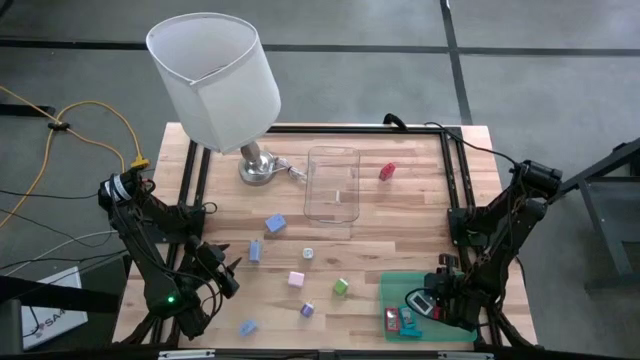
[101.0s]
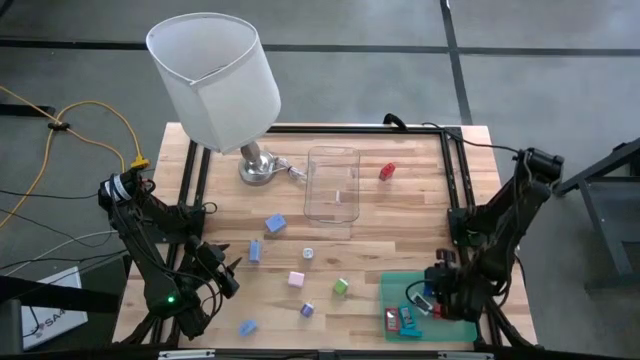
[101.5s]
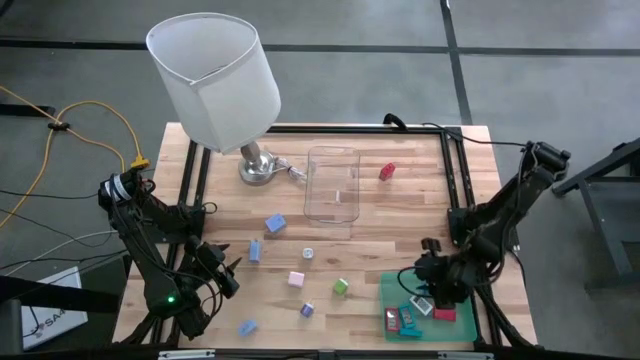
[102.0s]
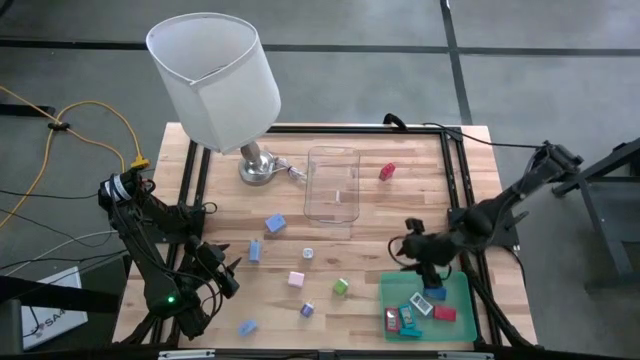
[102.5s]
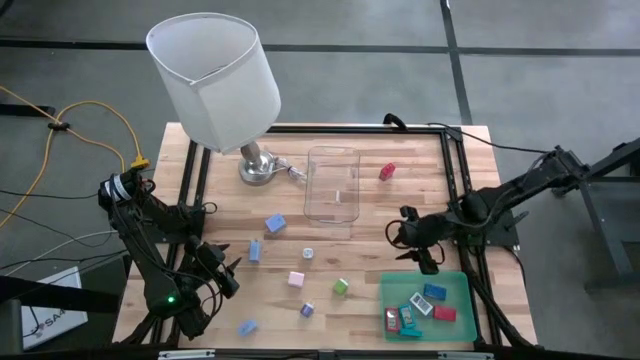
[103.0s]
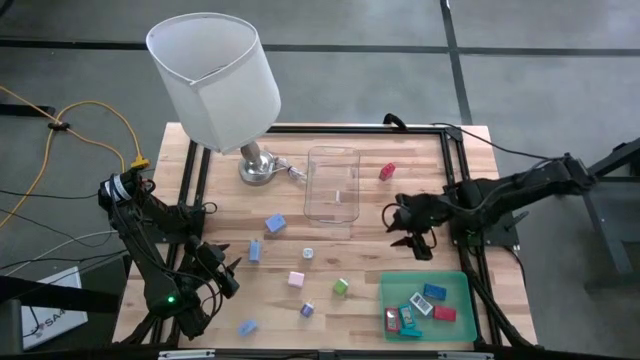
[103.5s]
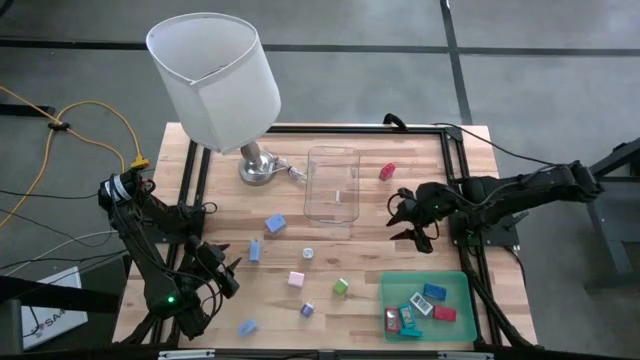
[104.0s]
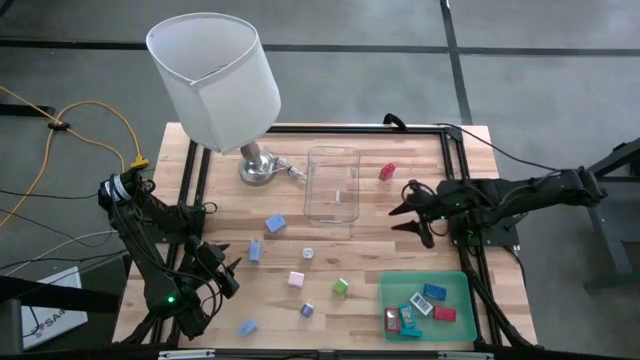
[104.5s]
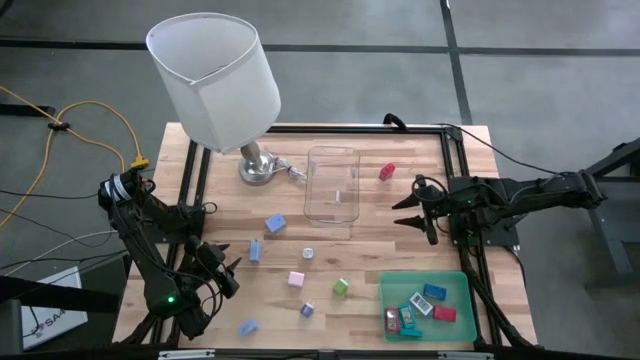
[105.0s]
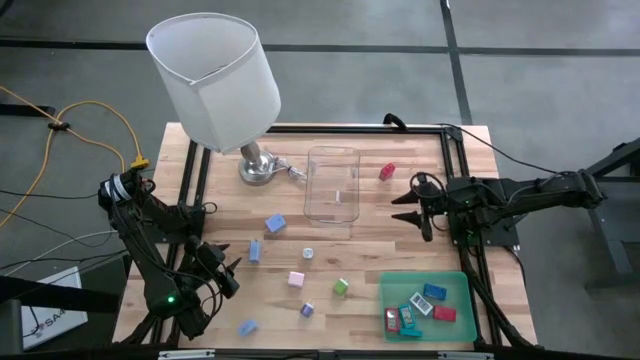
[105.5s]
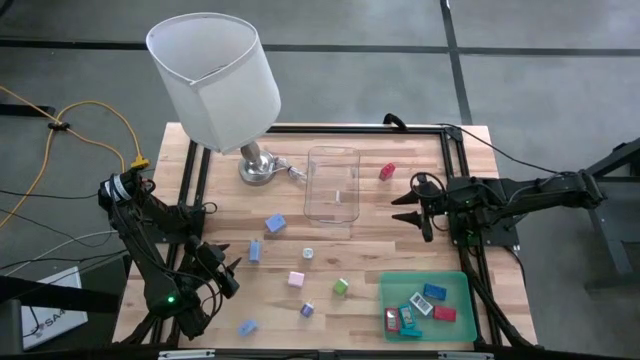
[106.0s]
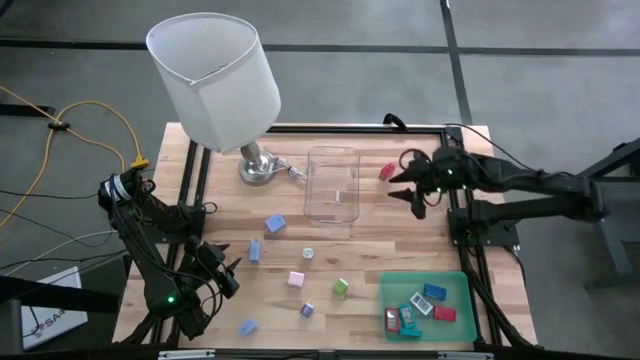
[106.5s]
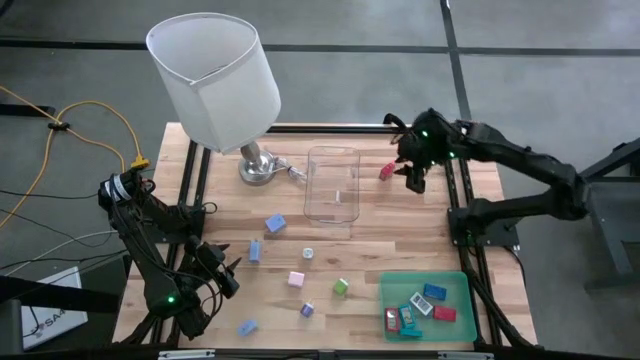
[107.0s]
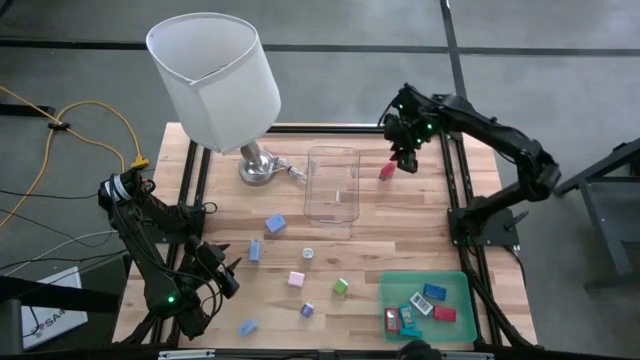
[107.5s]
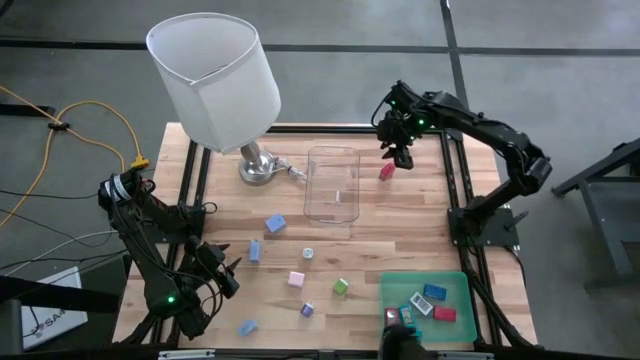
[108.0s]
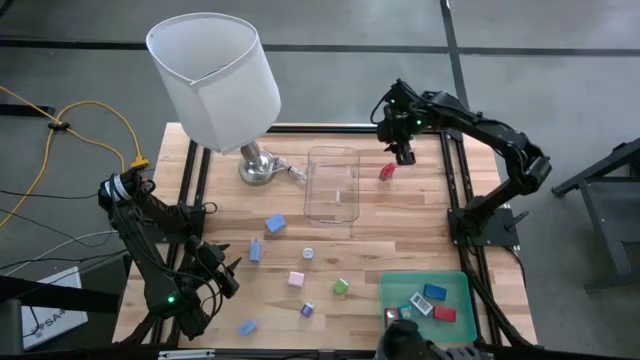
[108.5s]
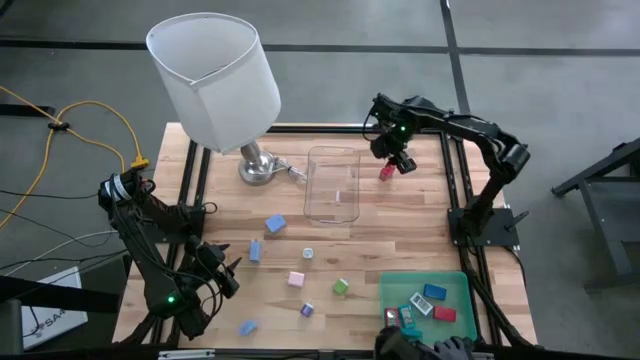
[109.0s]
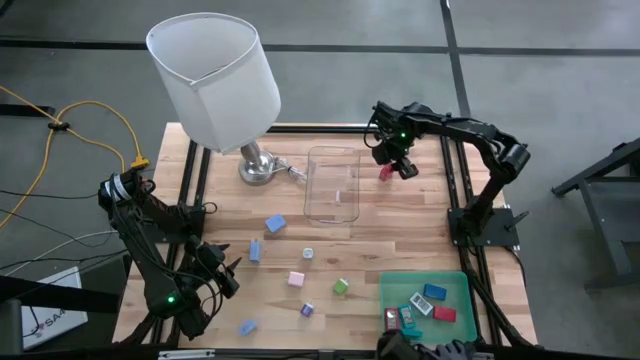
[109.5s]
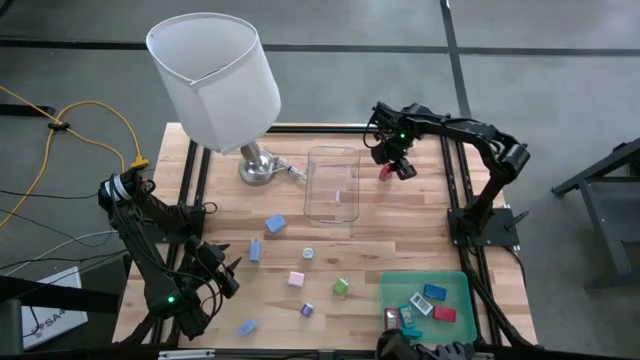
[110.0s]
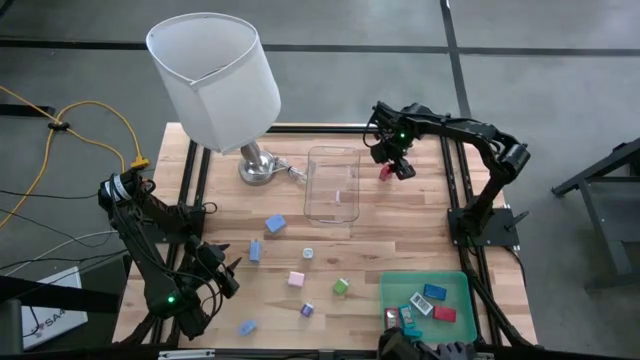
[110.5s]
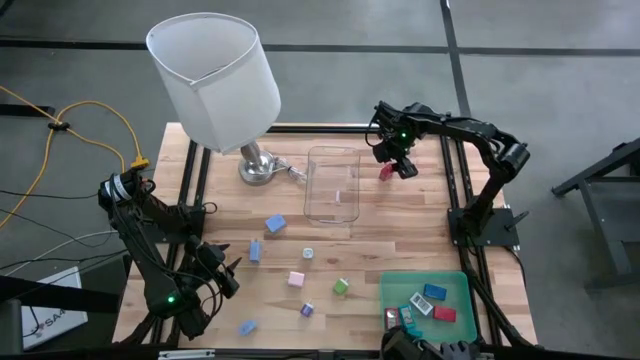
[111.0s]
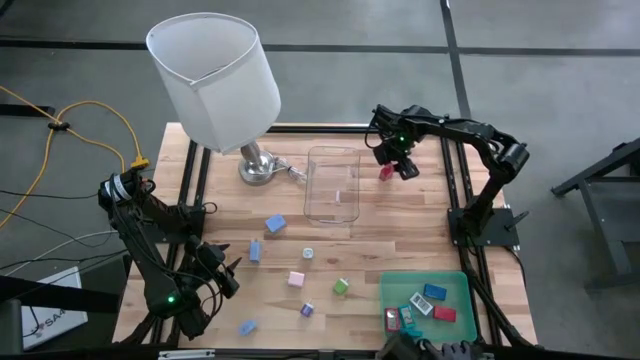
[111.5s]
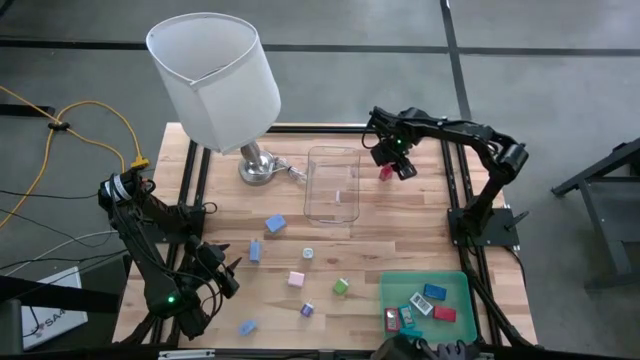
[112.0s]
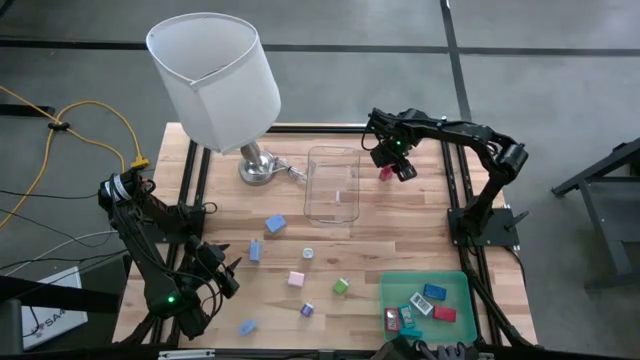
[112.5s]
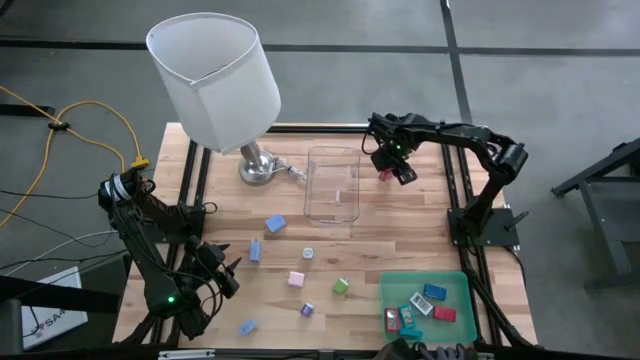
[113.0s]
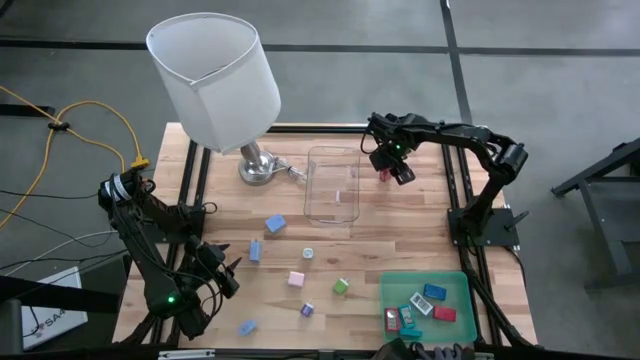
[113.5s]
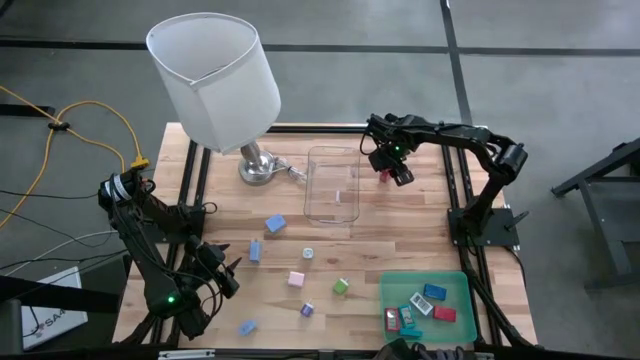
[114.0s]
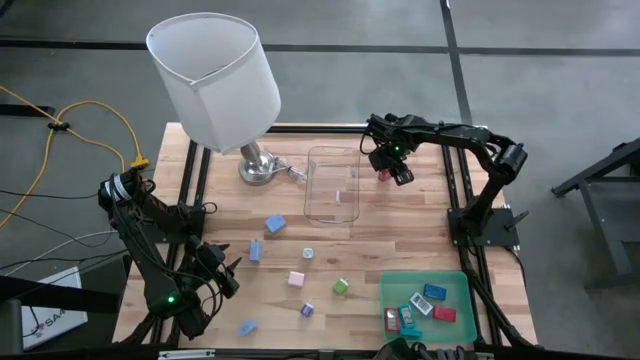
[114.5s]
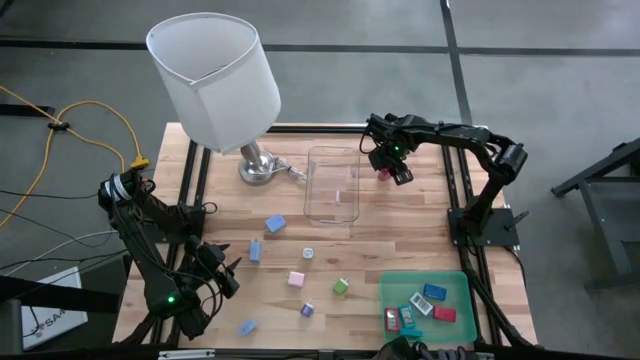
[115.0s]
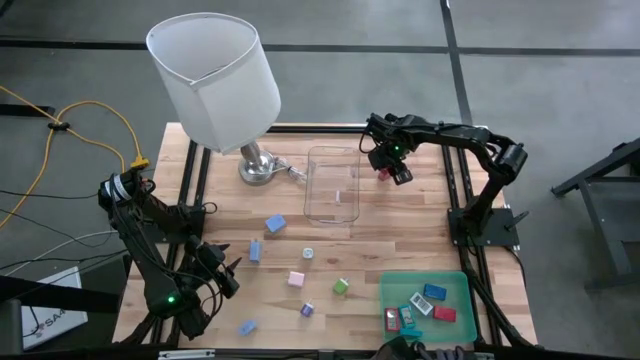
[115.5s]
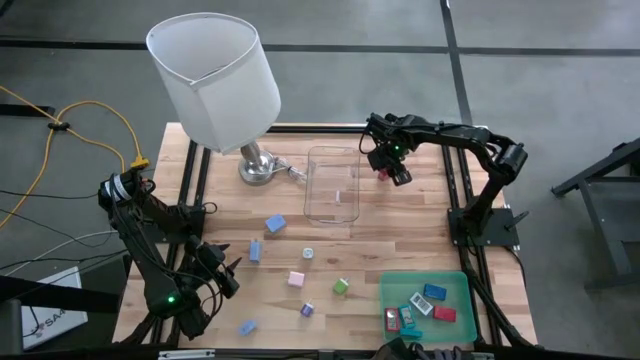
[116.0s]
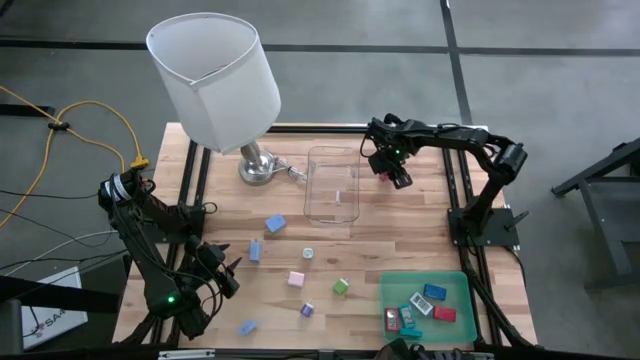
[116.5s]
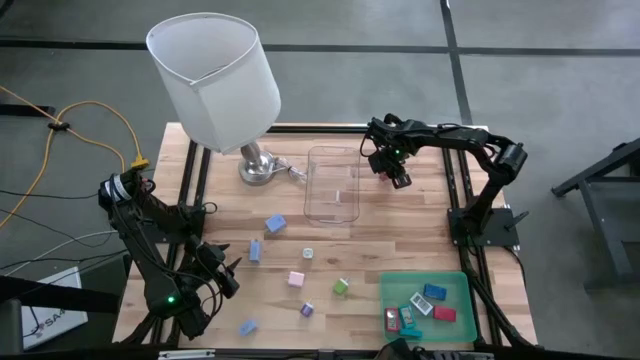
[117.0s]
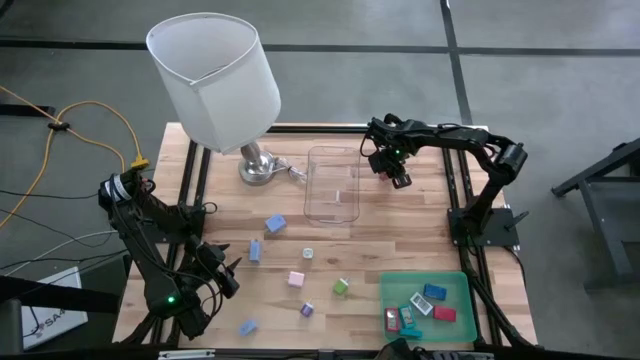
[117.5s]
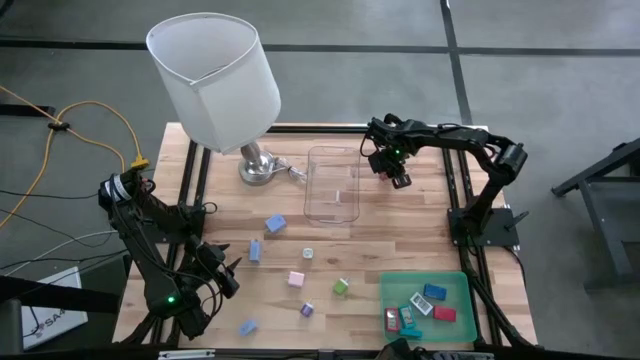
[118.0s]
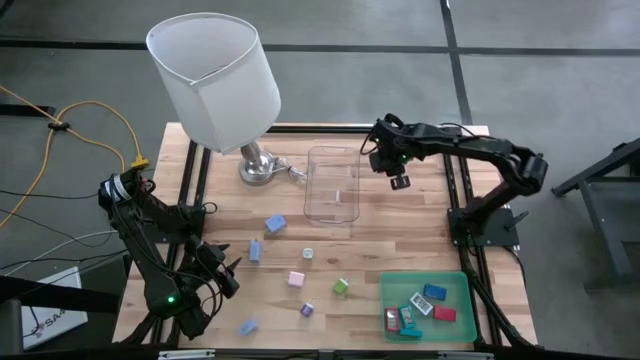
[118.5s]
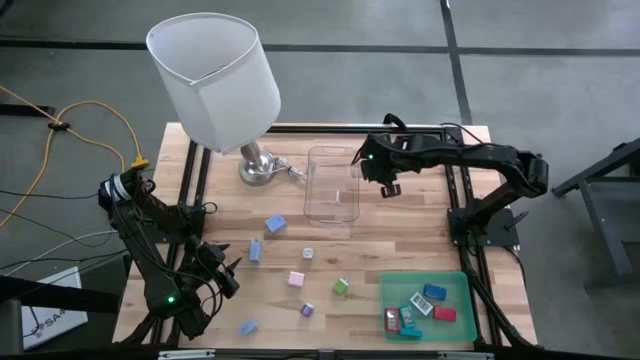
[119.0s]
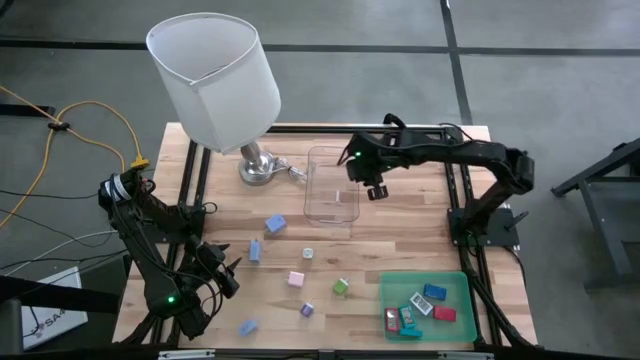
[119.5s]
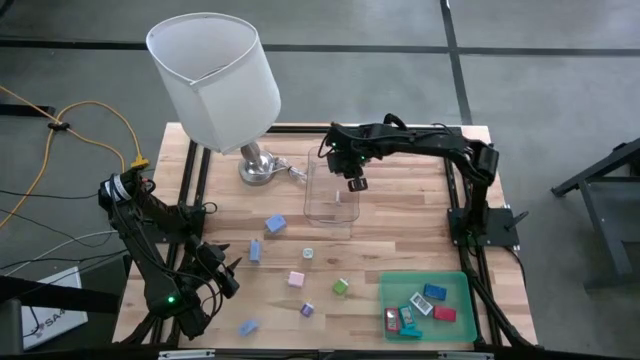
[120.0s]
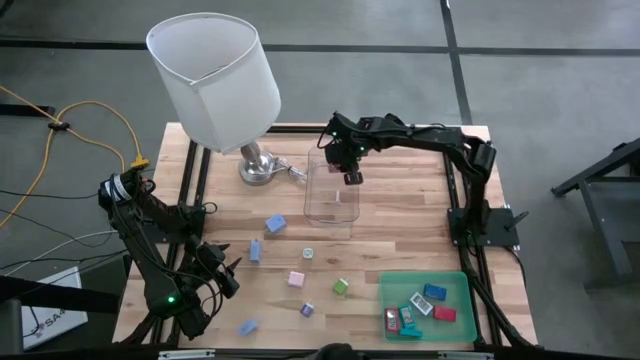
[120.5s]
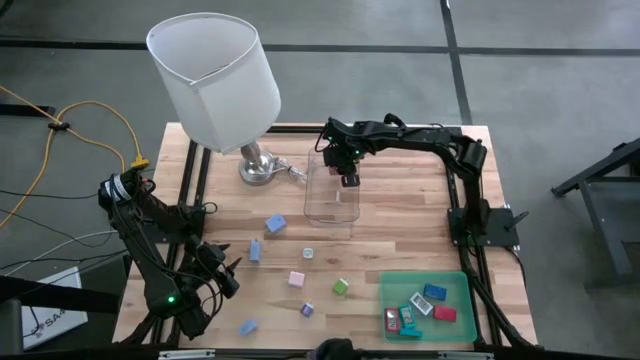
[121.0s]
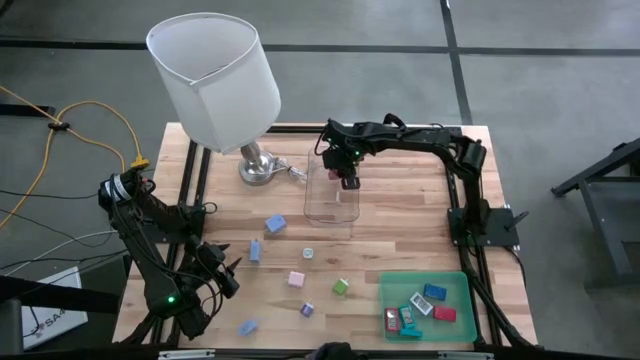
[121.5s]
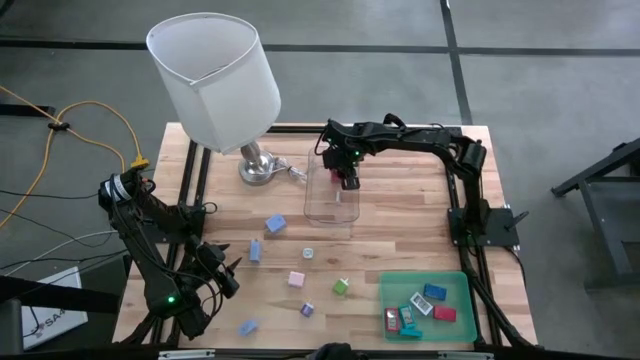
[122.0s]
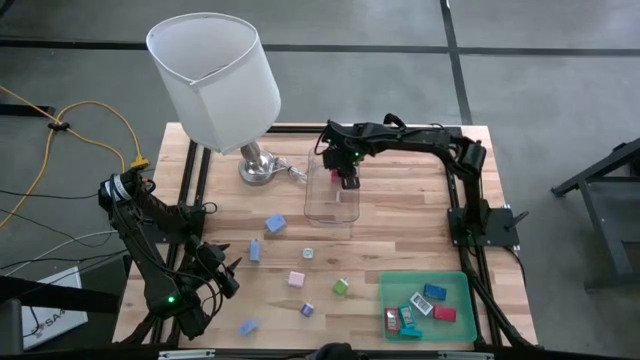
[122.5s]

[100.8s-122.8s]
Task: Pick & Place Office items
Put the red charger adapter into the transparent bin
